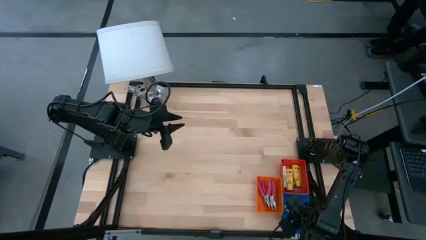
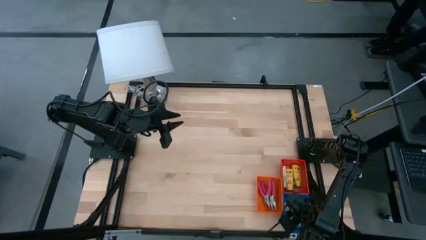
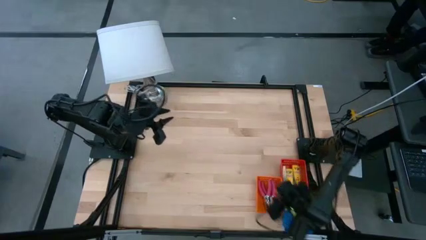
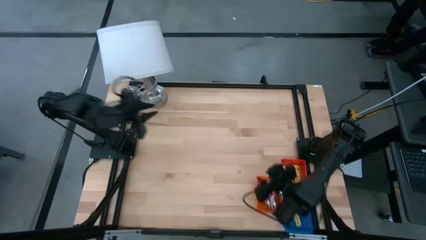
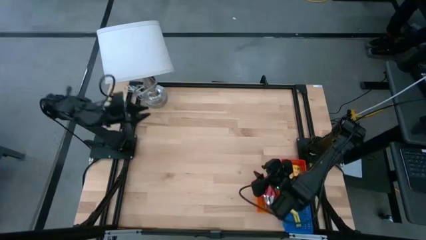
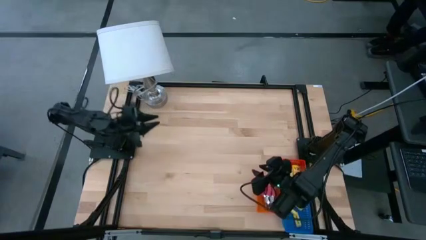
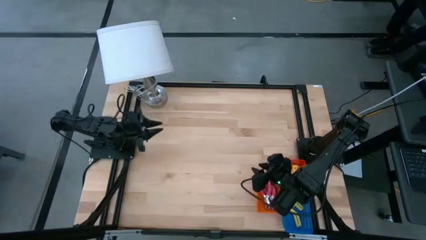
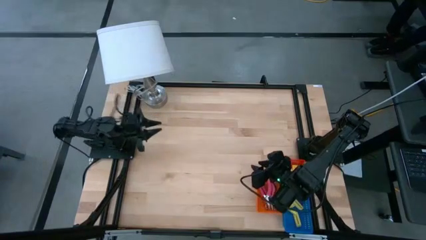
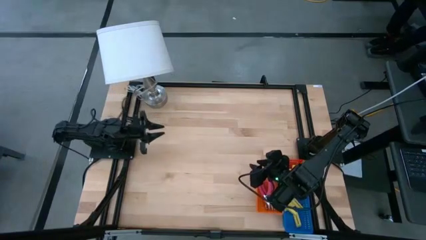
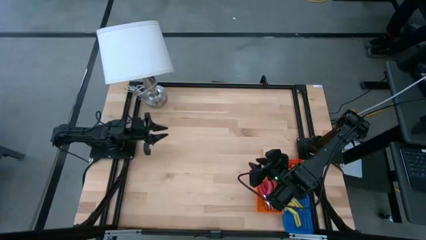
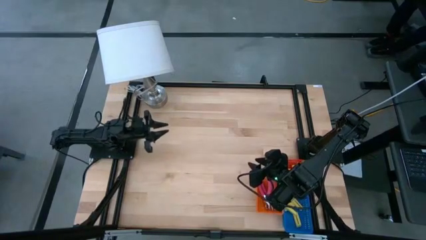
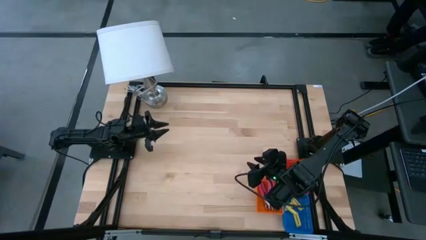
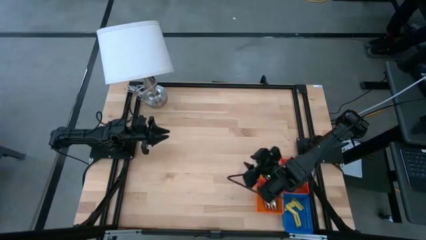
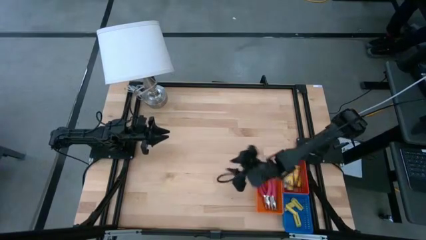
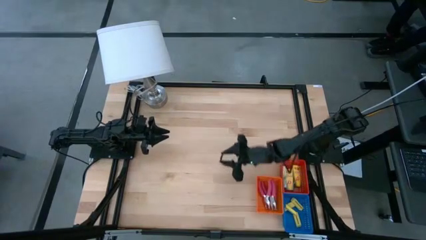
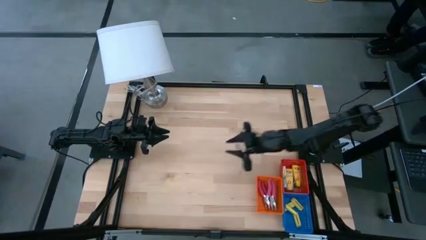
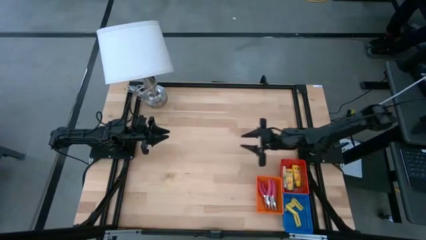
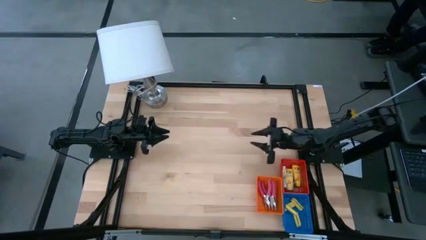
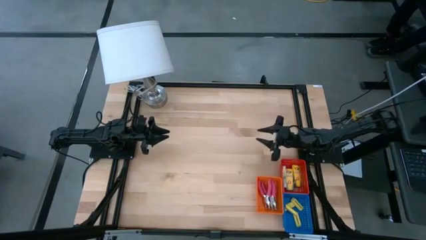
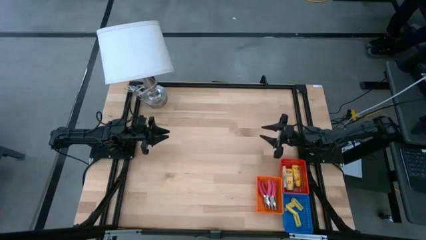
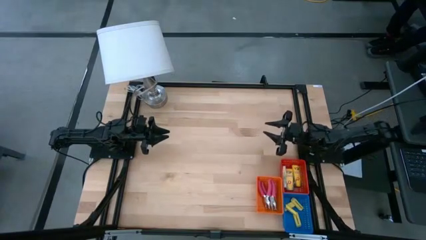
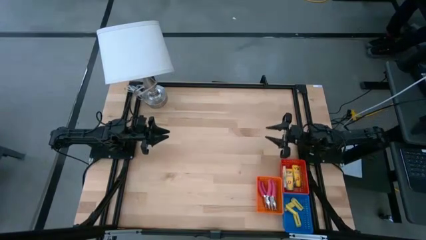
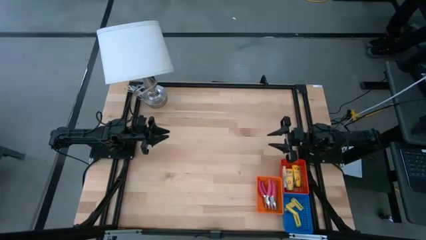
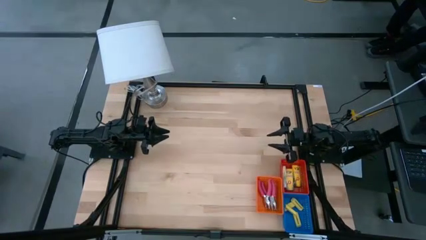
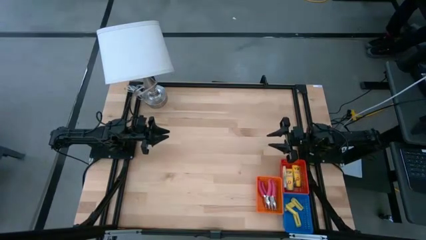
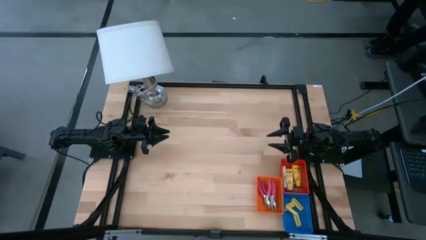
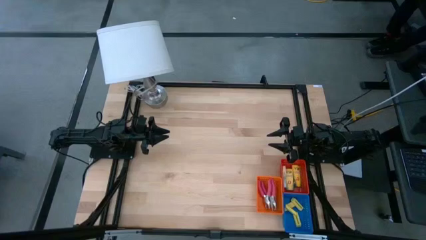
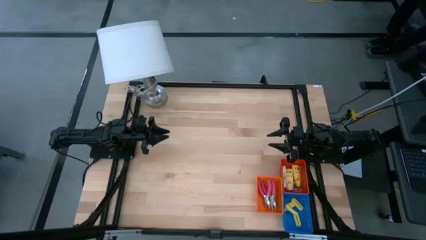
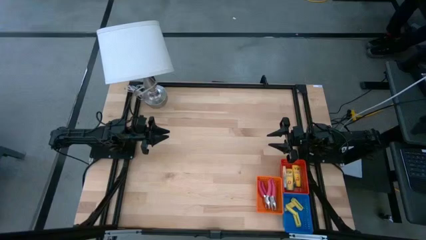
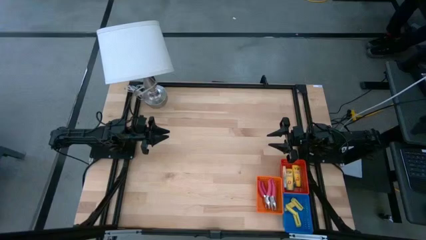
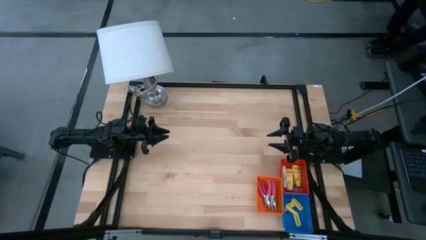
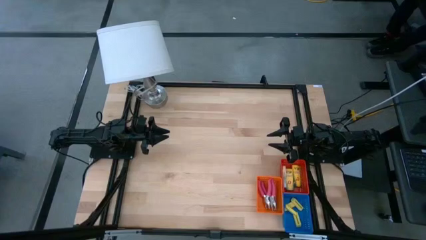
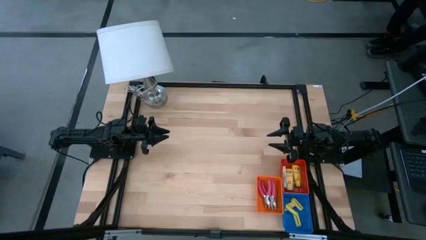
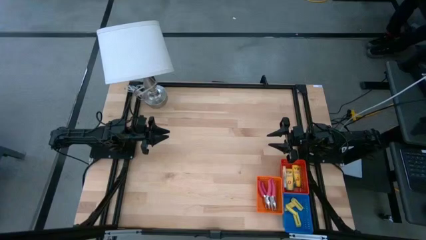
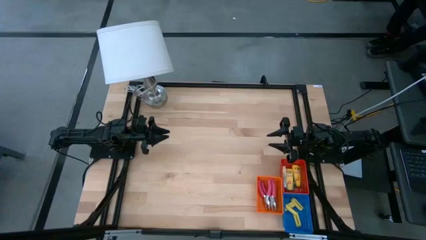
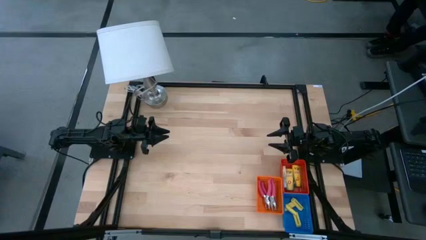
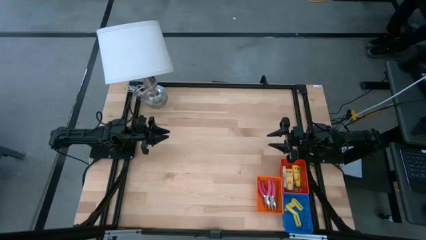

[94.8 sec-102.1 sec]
Task: Pick & Place School Supplies
Return to Home Position

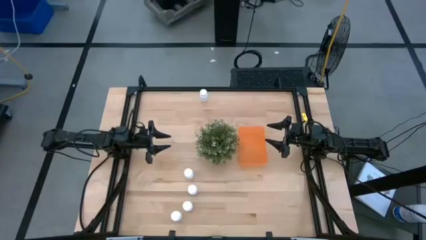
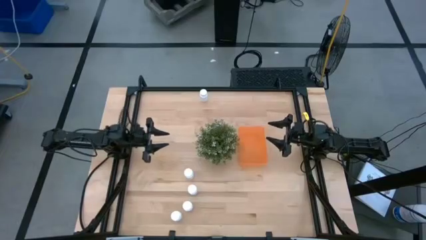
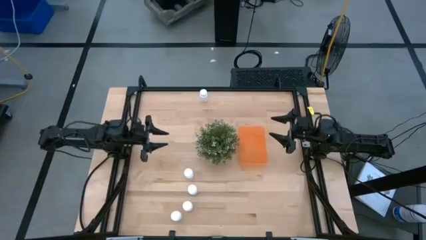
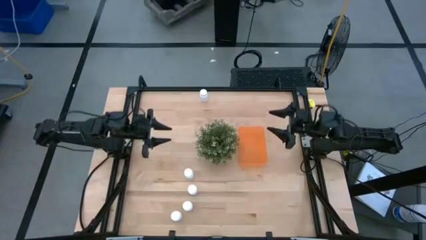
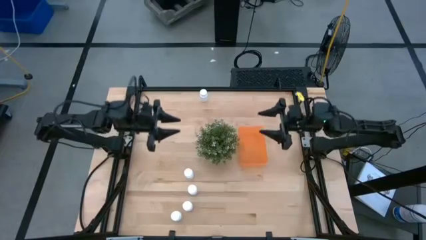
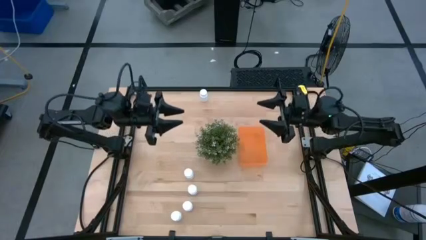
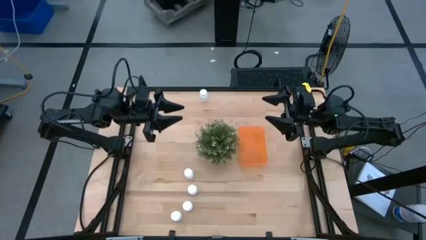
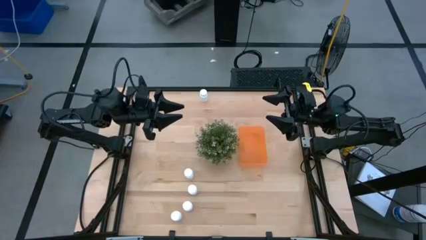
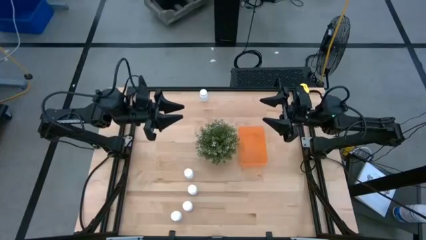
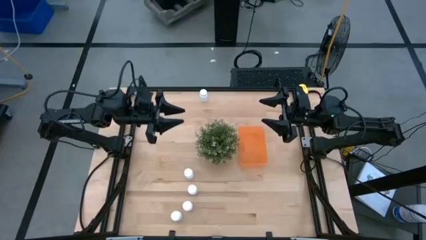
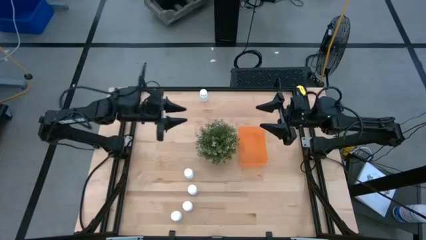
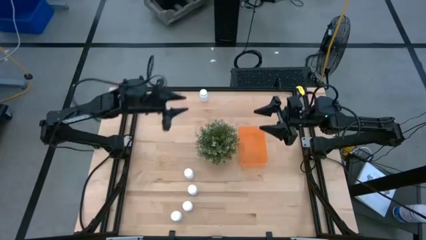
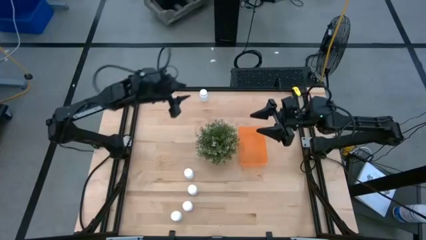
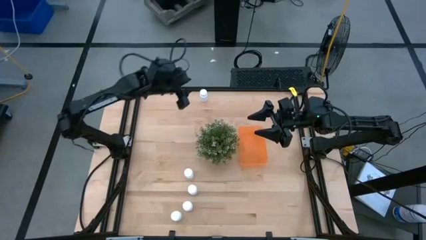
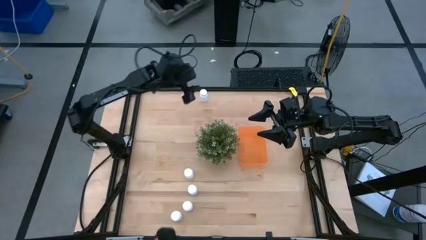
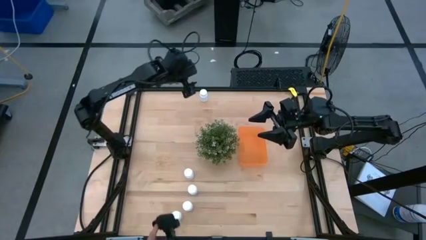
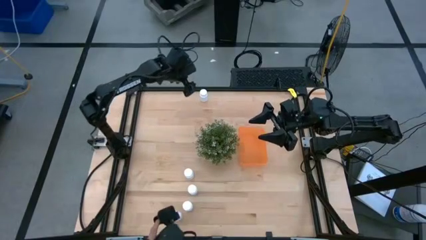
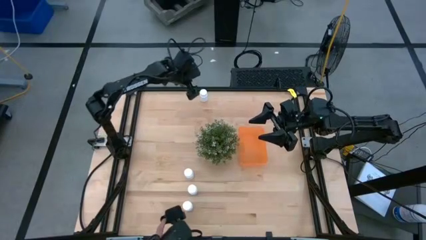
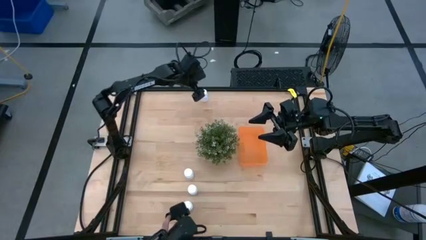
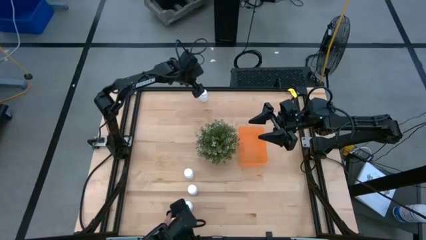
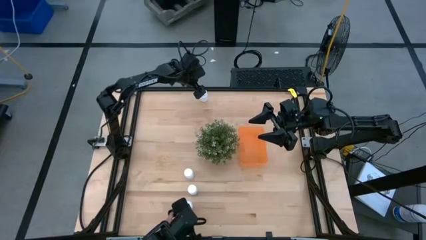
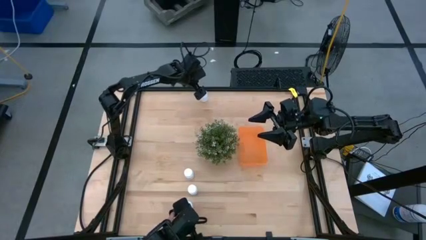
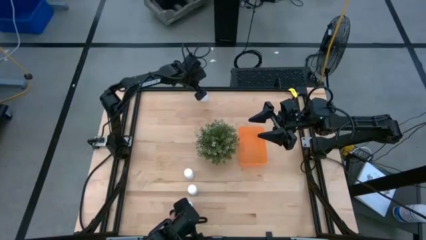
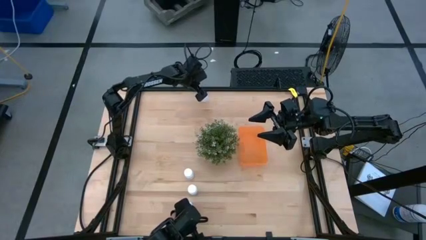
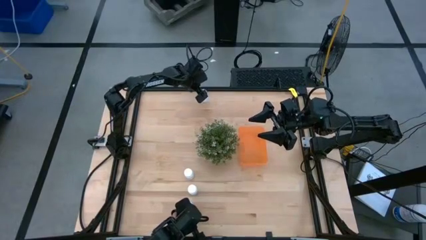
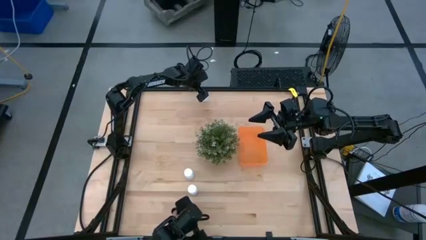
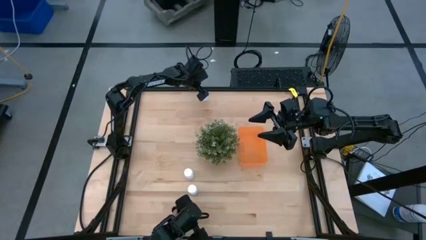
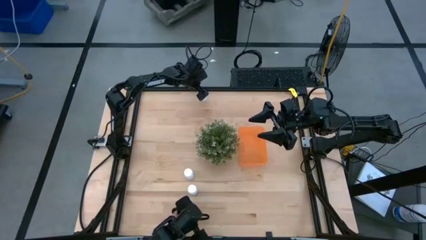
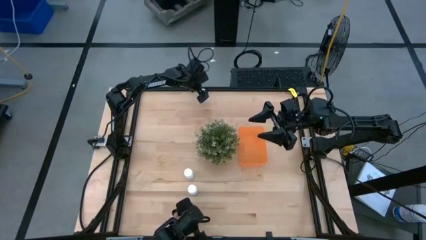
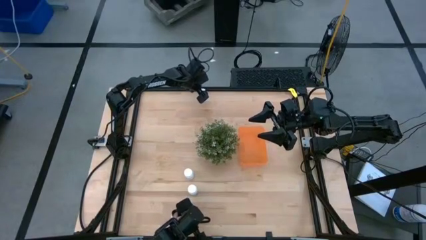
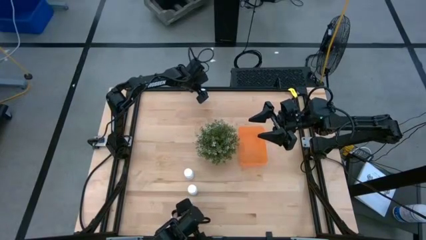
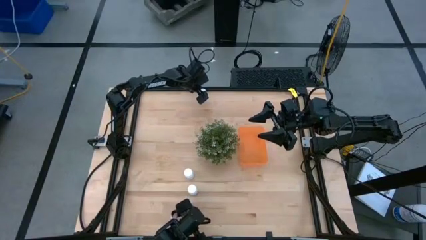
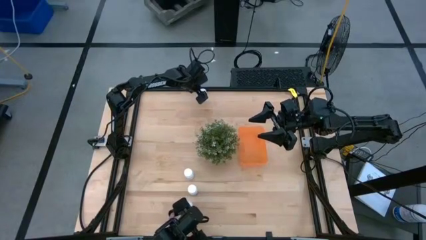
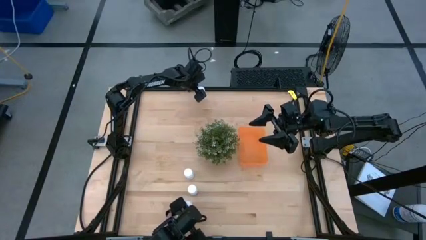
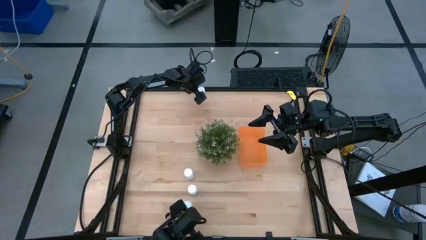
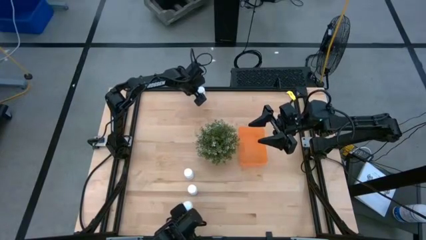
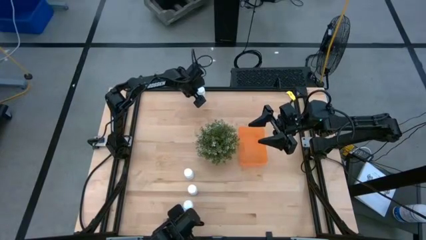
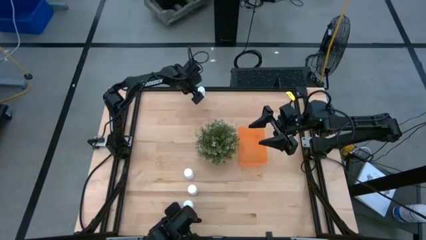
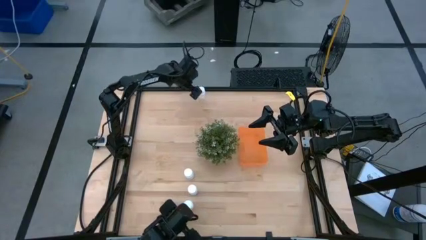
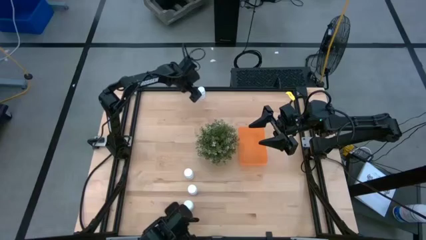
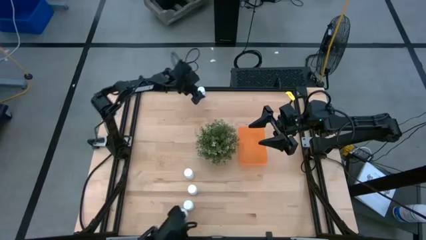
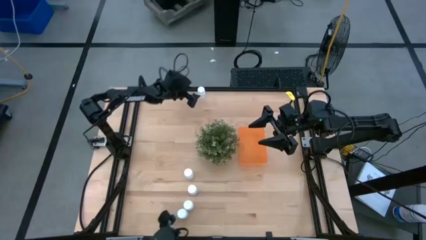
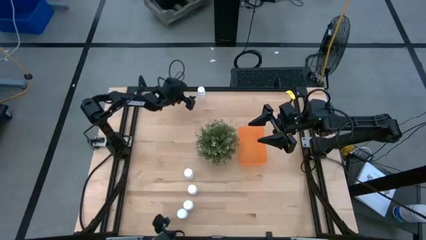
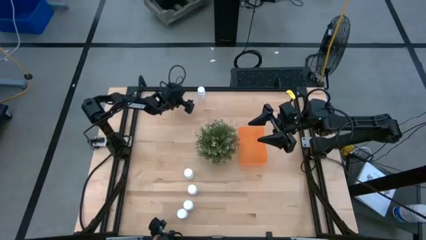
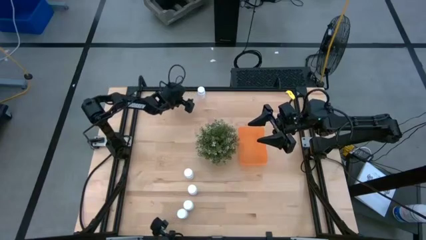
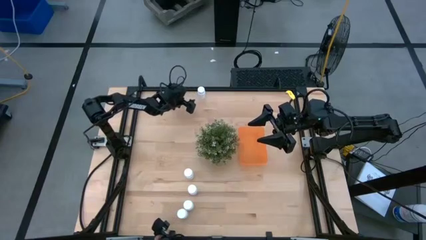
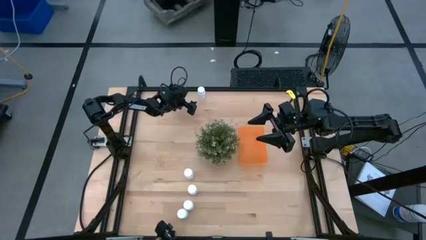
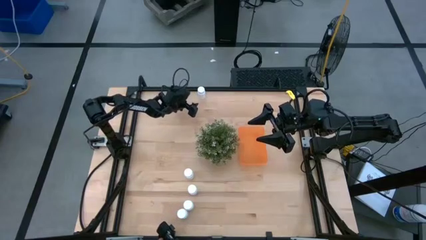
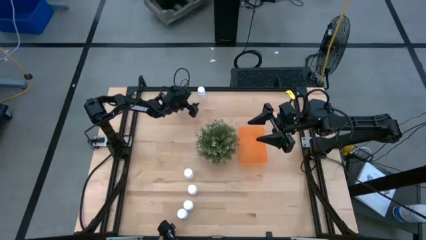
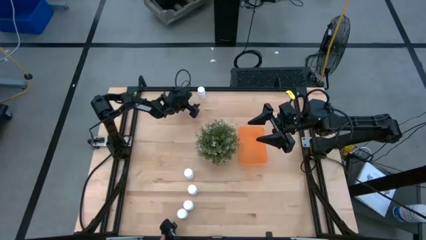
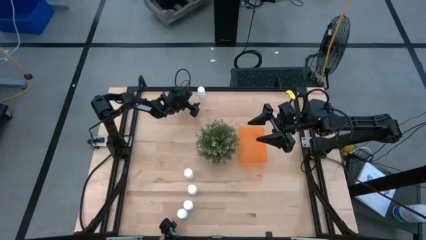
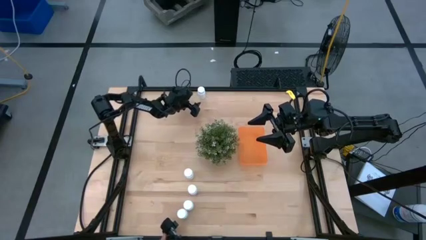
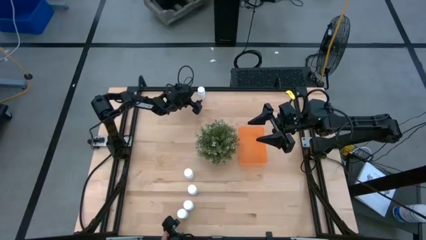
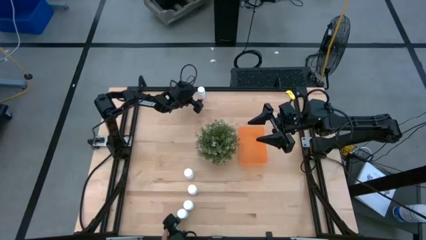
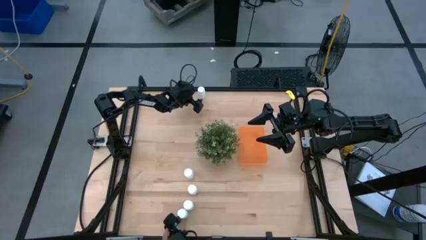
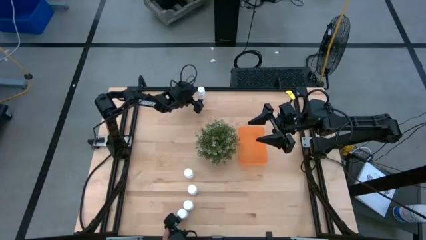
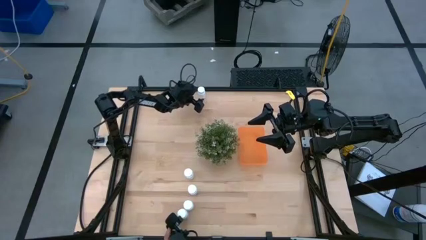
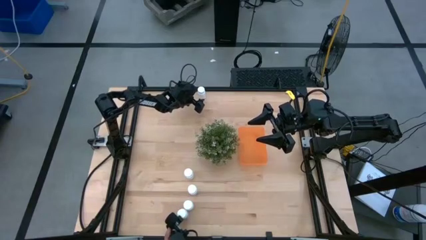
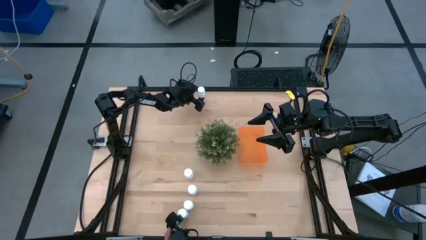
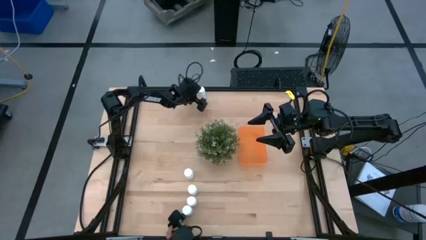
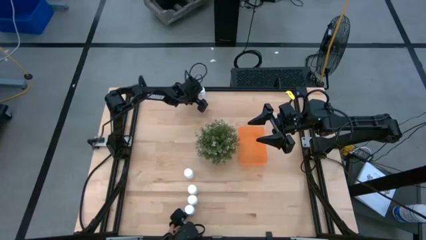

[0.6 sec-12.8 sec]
Task: Pick and place pill bottles into a basket
Put the white medicine bottle into the orange bin
